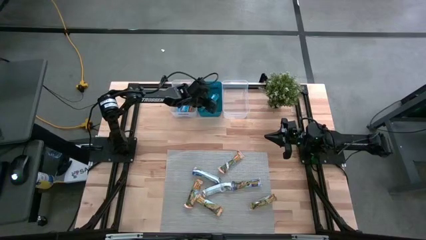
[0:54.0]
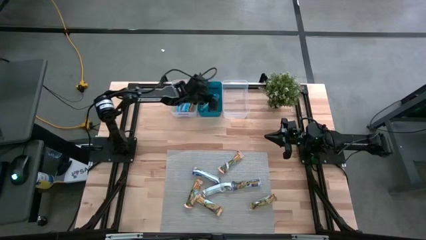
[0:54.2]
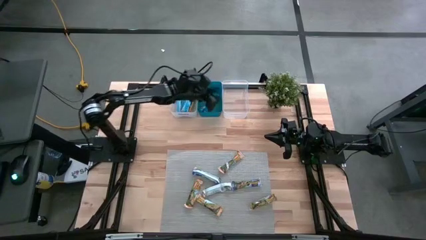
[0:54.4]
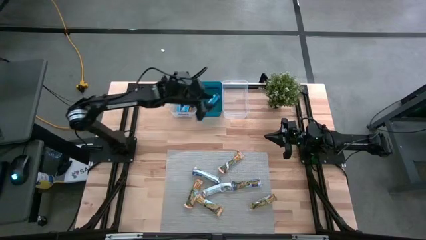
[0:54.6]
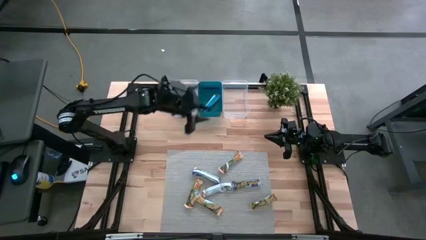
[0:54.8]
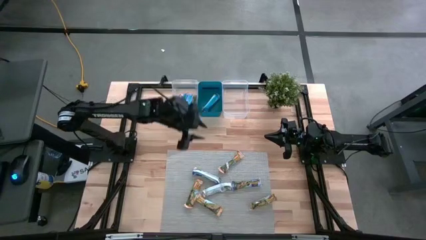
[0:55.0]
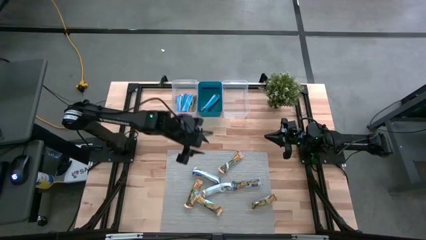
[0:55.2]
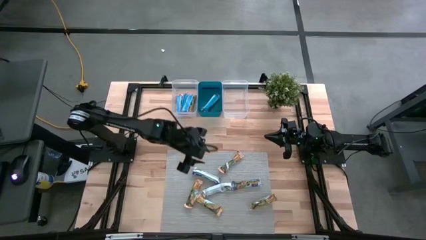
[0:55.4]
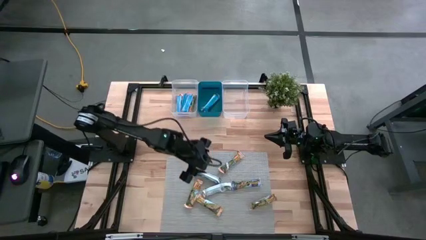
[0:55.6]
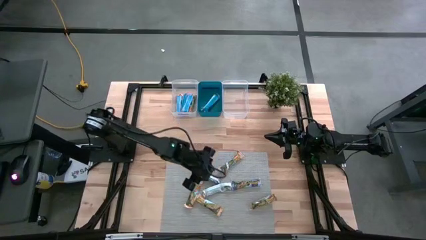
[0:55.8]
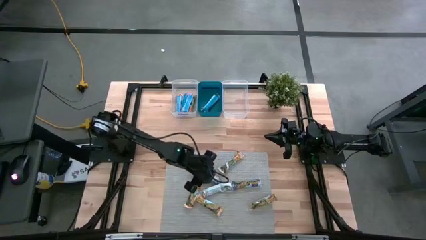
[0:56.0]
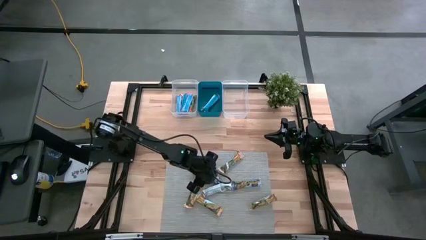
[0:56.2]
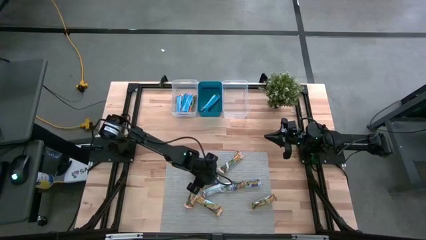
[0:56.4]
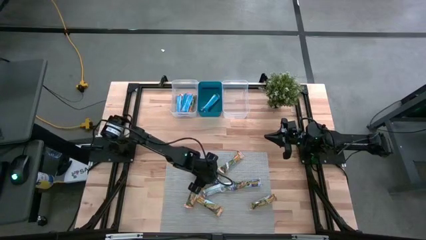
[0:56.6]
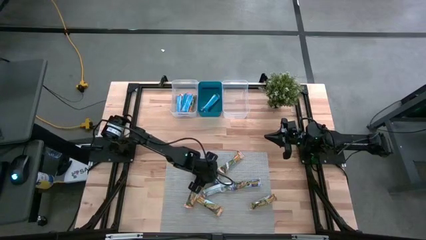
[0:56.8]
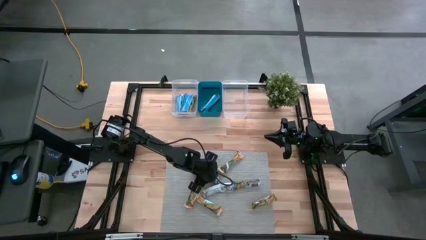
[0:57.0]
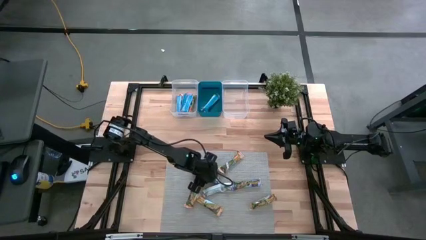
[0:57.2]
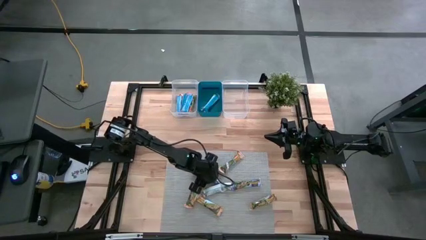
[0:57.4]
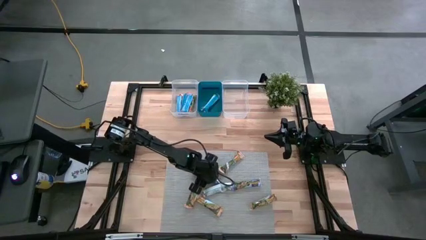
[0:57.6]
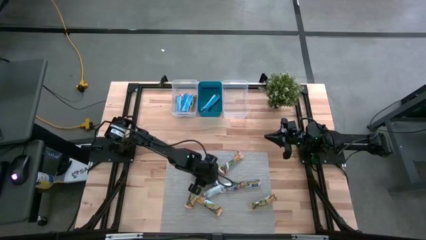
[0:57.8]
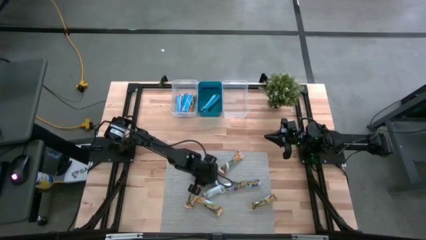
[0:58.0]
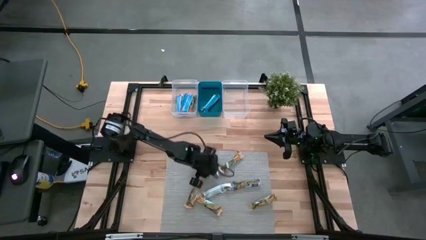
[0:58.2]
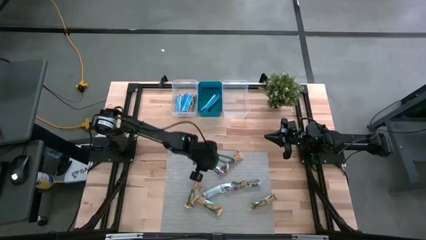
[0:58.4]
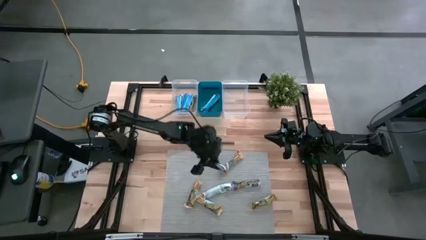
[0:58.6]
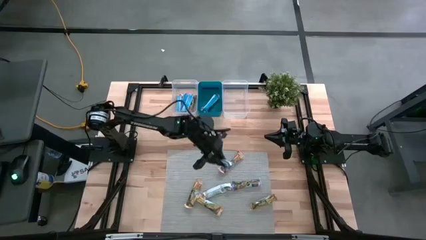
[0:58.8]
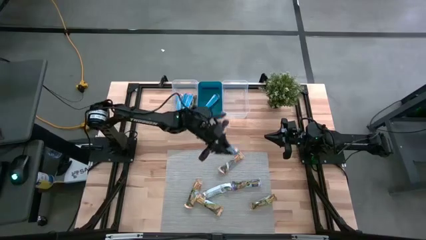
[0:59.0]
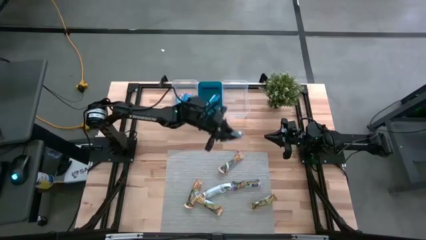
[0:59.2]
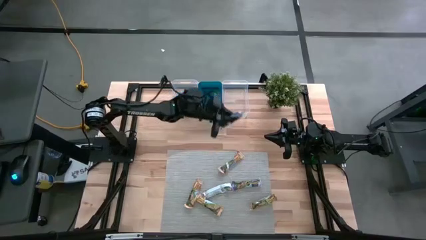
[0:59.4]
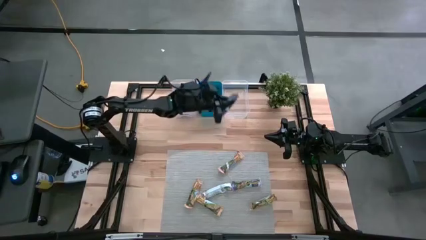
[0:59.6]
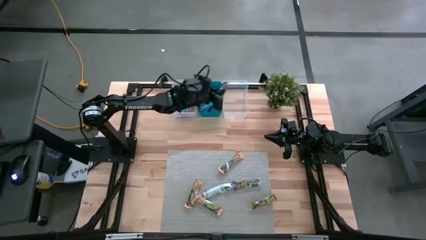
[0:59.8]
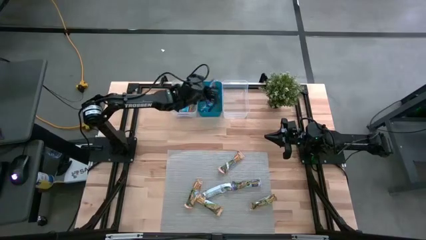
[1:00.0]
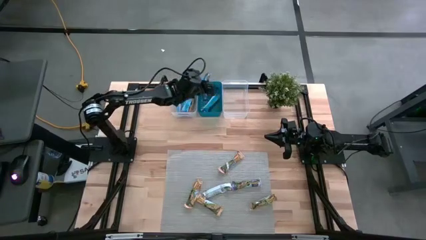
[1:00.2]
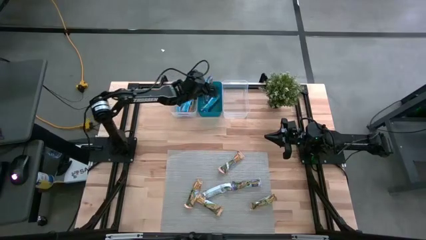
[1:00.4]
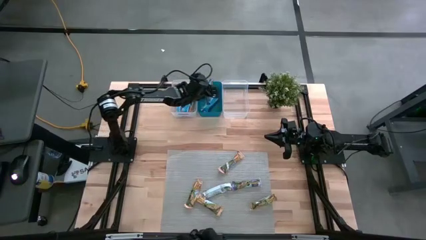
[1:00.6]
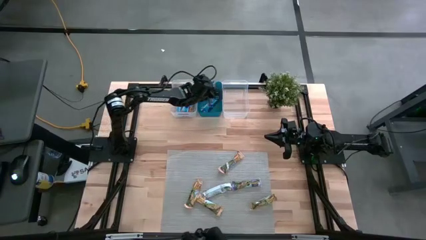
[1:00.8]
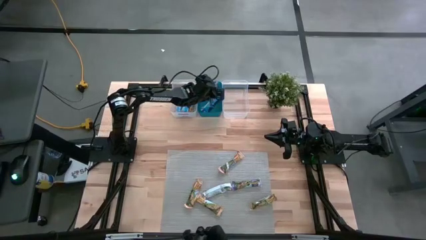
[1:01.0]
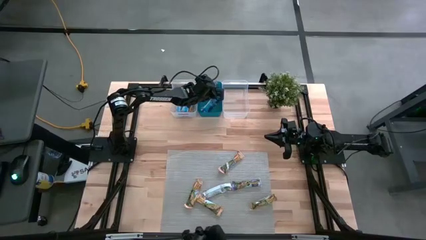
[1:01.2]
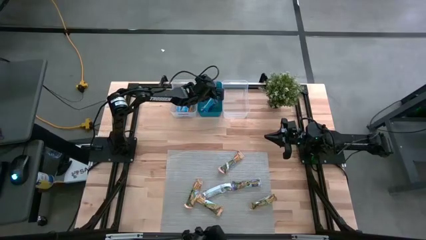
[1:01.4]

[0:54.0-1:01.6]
Task: Pick and place Granola Bars by type
Put the blue granola bar into the blue bin

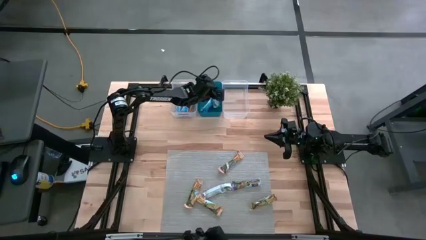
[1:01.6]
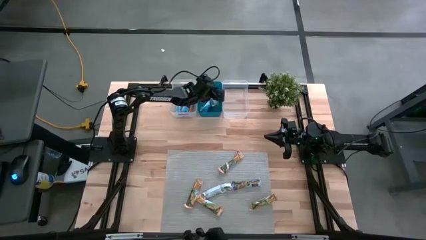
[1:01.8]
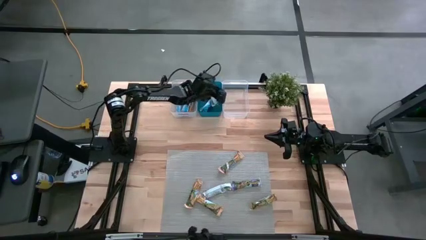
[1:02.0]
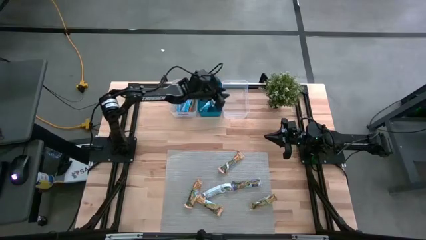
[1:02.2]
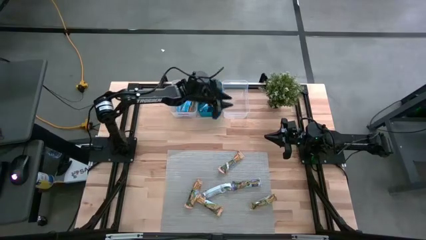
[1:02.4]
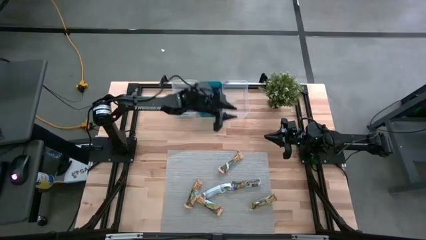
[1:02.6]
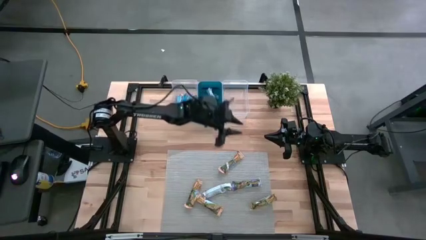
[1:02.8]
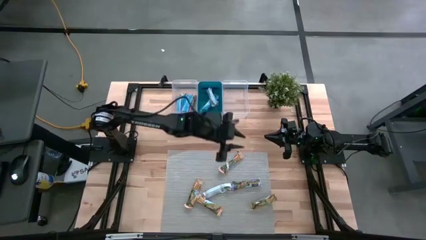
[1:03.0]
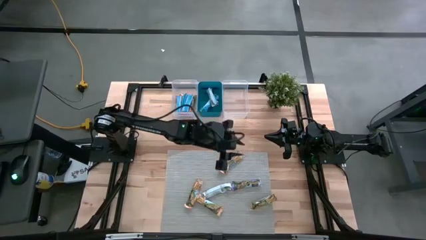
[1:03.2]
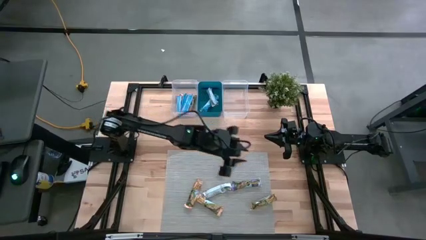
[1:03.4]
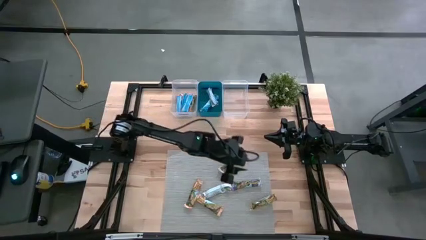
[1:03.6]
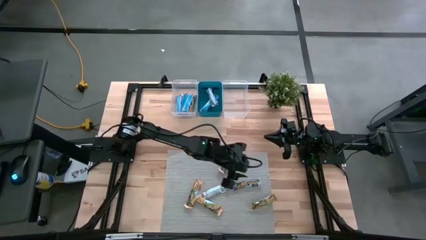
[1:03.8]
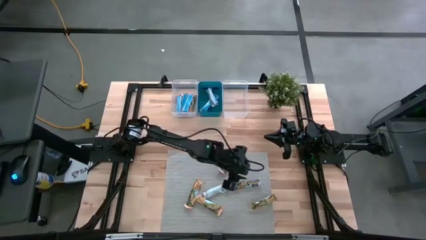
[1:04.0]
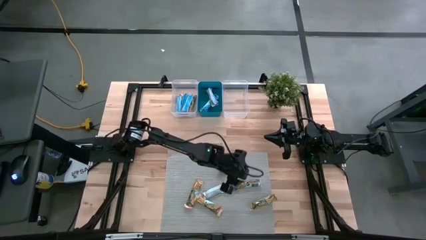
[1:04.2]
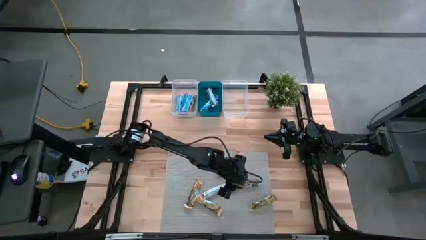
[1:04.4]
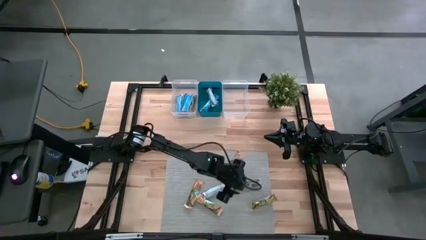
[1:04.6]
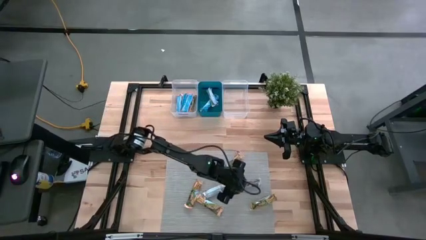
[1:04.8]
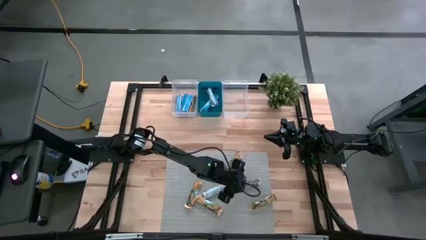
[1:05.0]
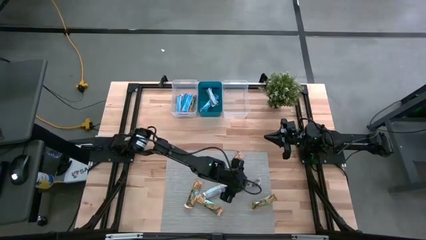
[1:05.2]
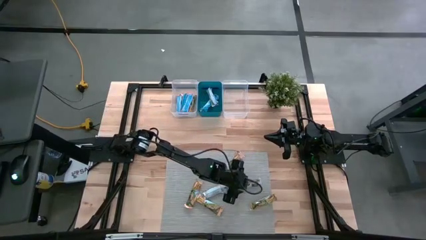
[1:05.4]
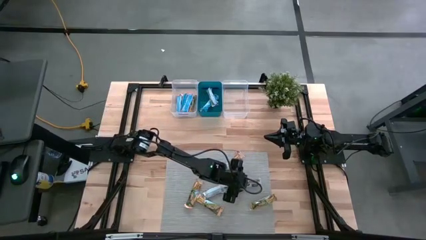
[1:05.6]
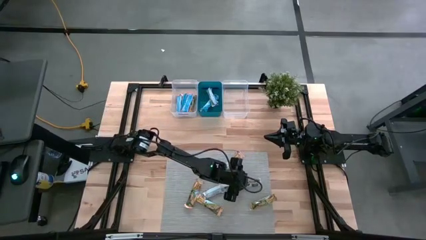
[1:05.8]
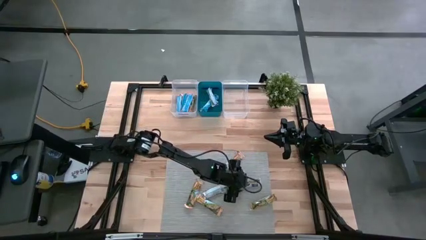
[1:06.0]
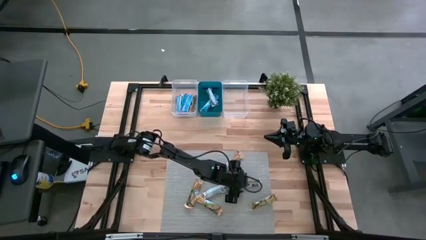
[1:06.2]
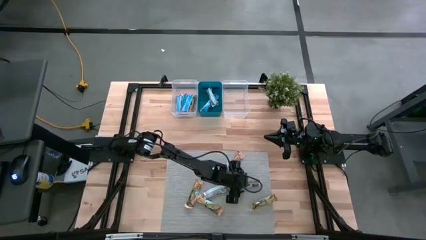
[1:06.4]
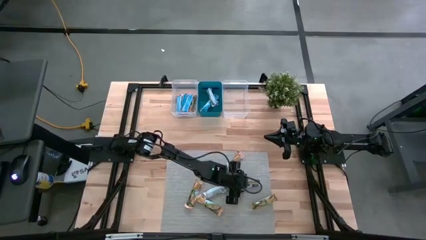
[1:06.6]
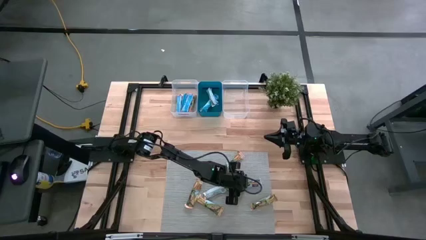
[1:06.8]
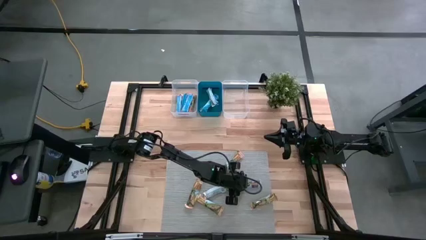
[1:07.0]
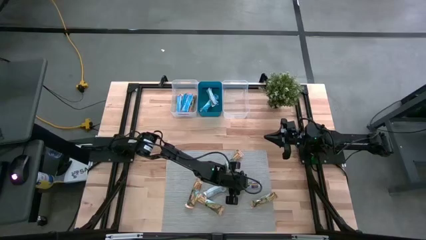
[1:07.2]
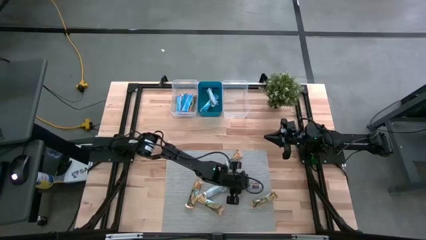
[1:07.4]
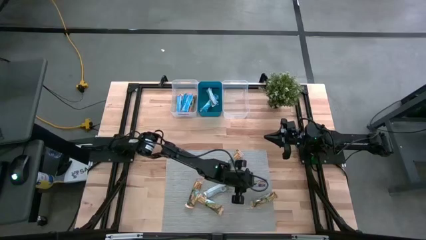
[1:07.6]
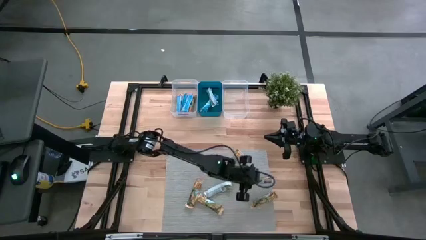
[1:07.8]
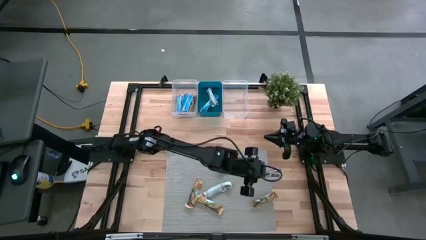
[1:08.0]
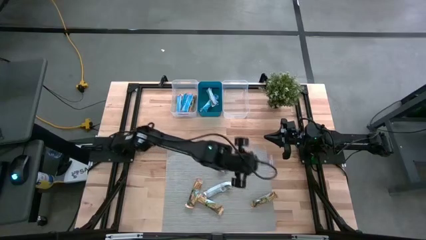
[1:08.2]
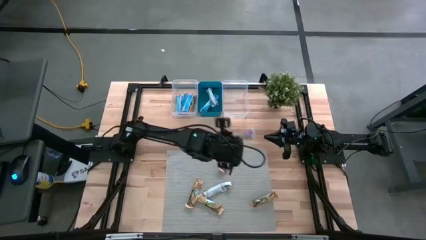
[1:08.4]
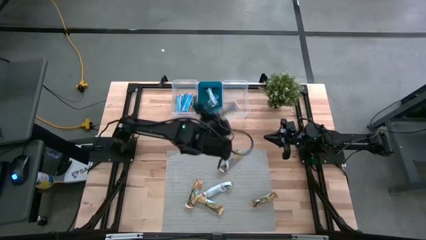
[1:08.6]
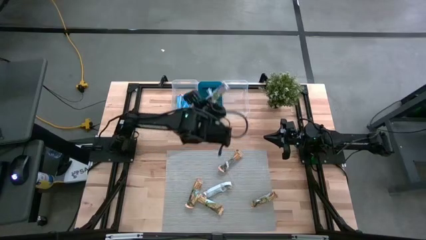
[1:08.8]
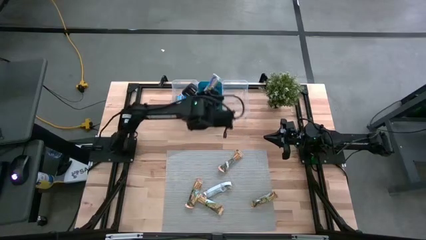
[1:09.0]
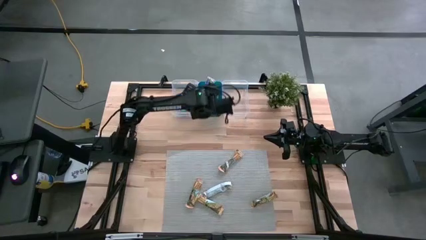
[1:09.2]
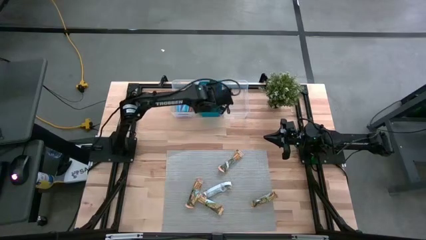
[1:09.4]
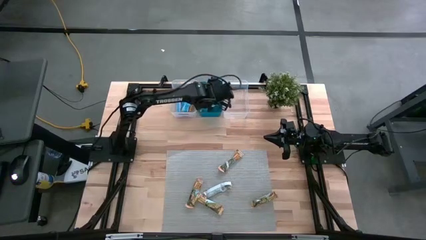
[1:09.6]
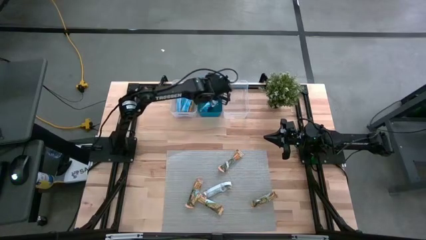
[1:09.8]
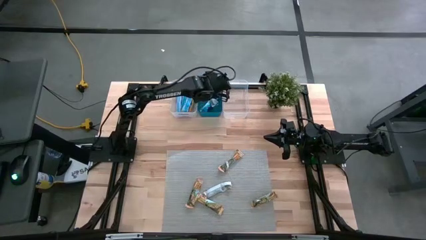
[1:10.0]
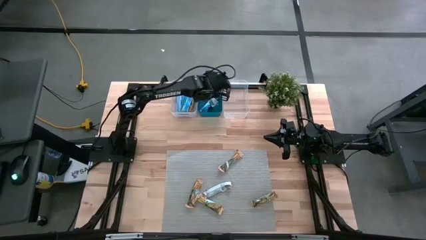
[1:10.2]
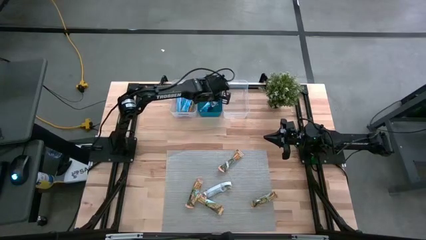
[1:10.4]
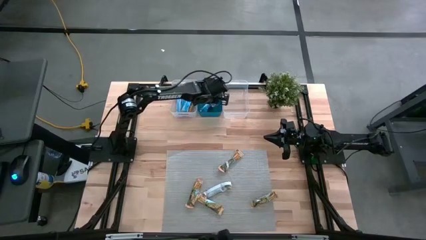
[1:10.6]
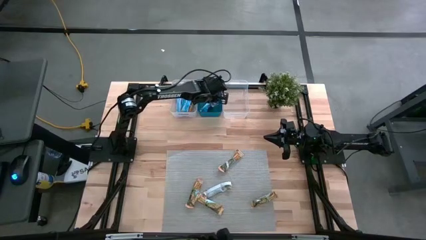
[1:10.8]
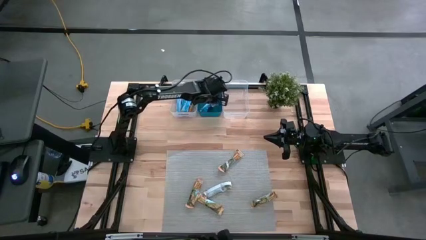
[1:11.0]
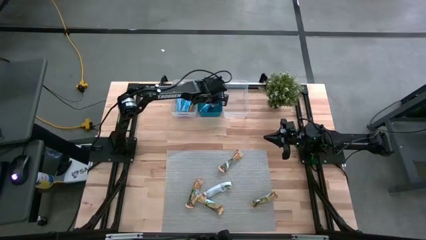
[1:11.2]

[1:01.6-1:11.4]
Put the blue granola bar into the blue bin
